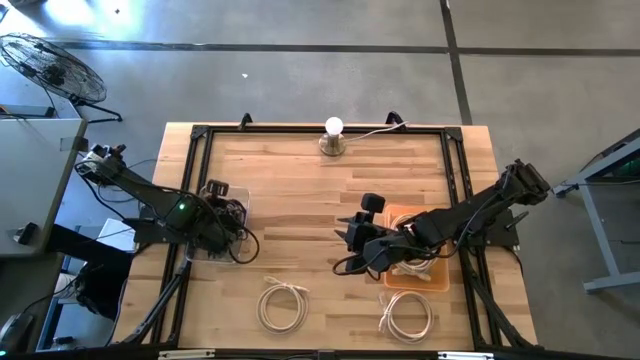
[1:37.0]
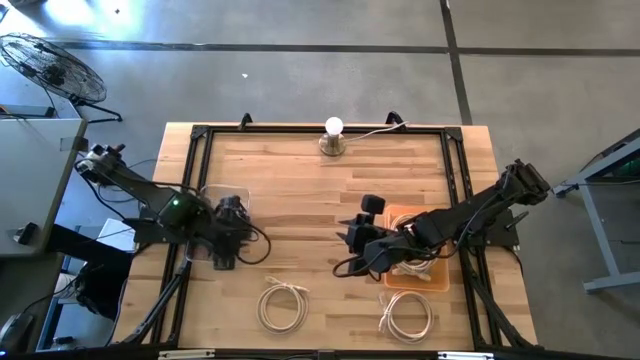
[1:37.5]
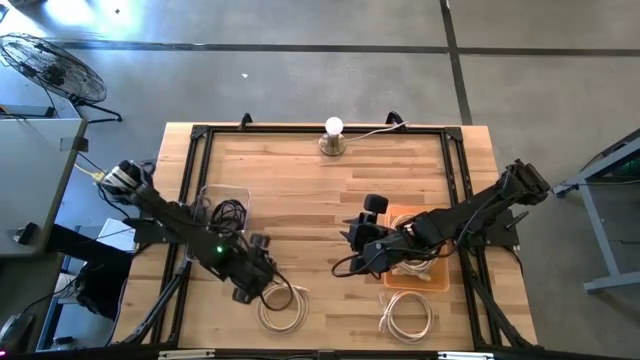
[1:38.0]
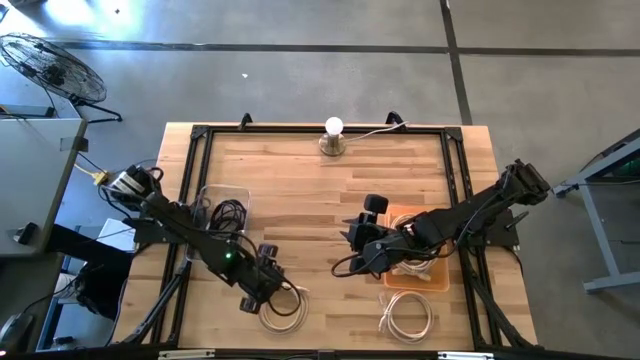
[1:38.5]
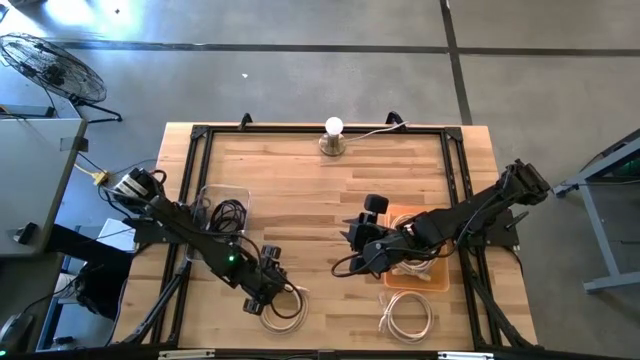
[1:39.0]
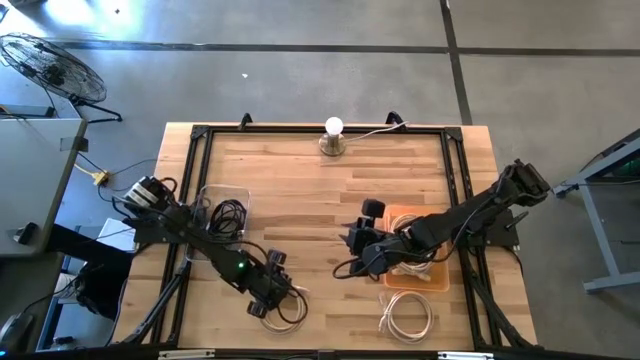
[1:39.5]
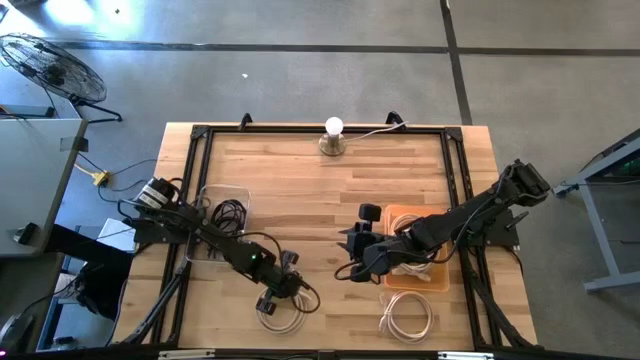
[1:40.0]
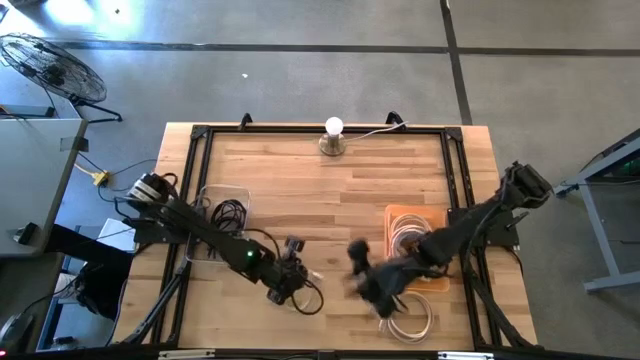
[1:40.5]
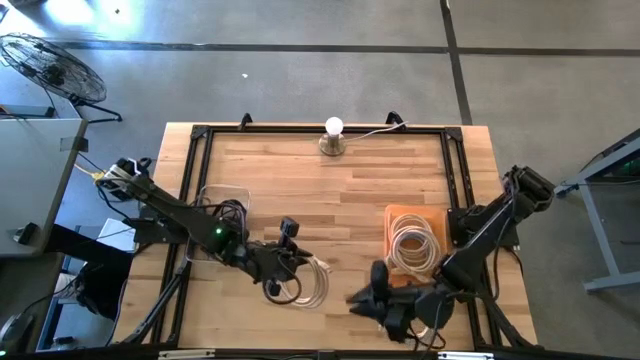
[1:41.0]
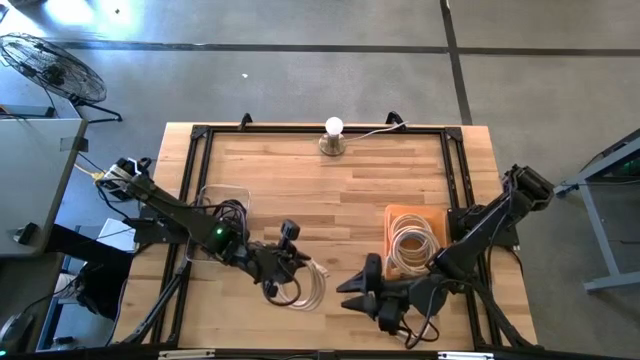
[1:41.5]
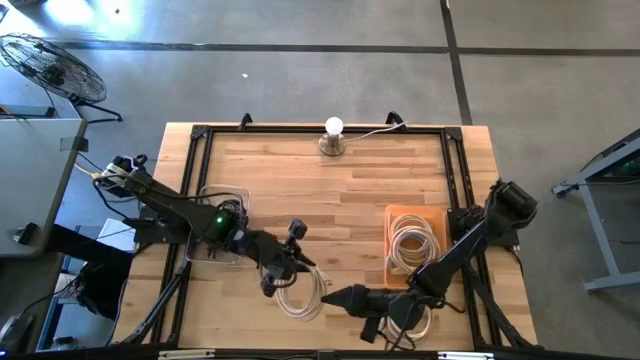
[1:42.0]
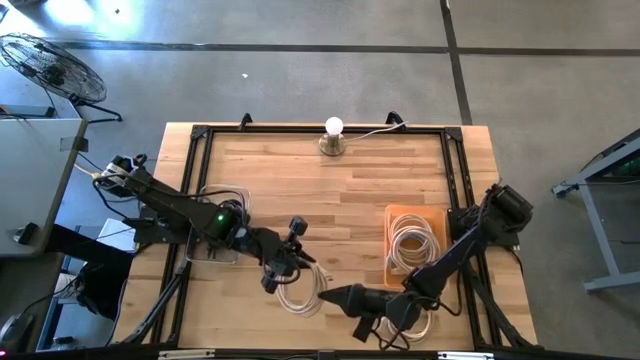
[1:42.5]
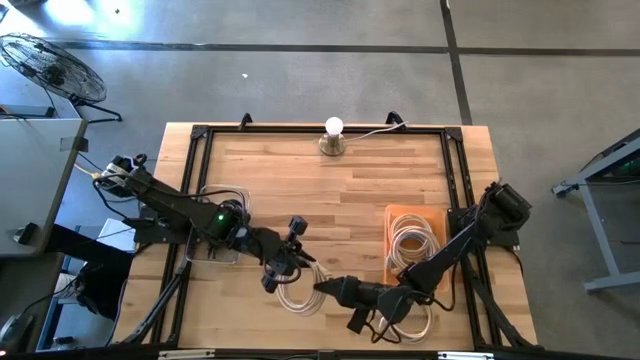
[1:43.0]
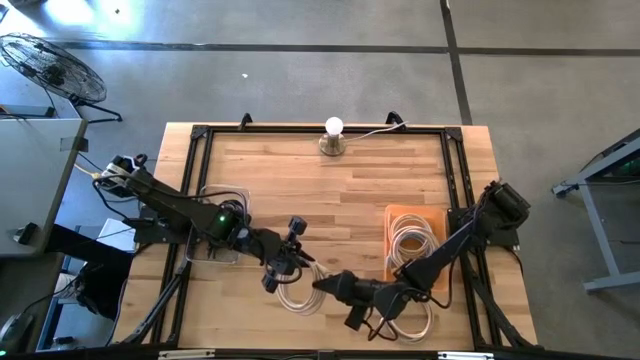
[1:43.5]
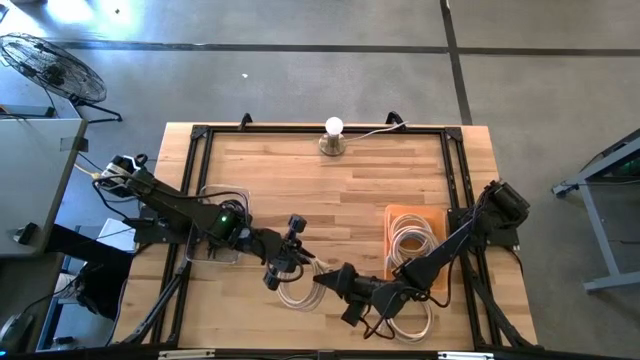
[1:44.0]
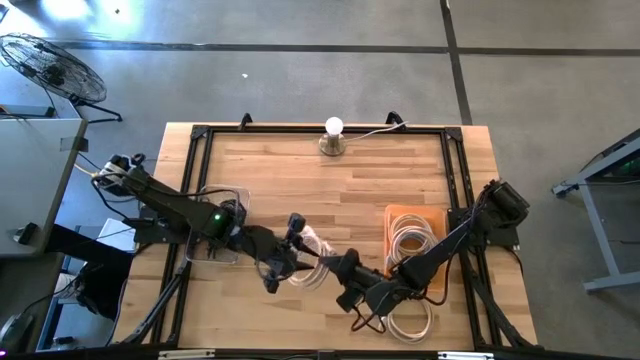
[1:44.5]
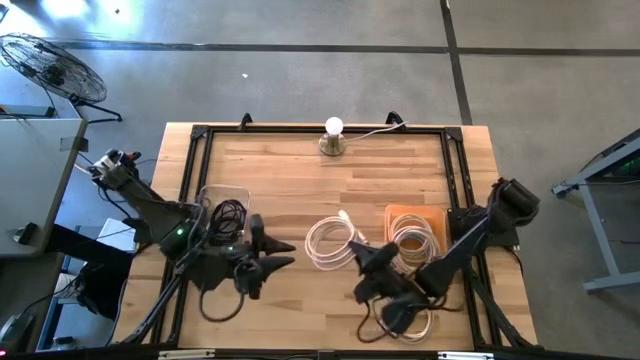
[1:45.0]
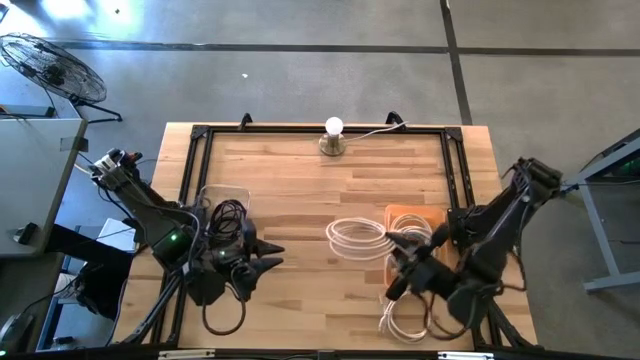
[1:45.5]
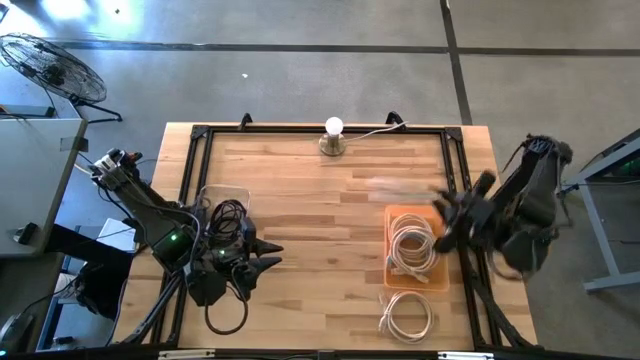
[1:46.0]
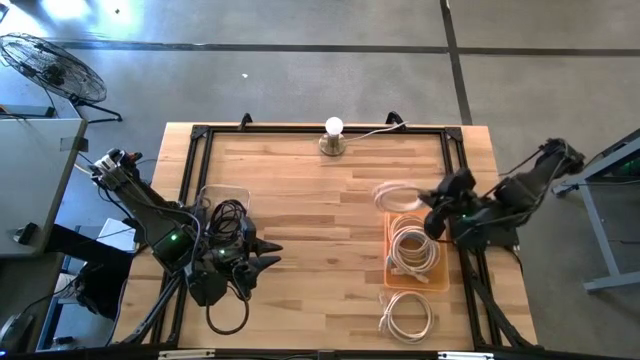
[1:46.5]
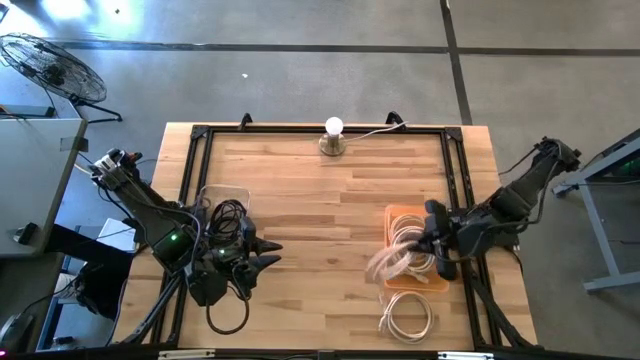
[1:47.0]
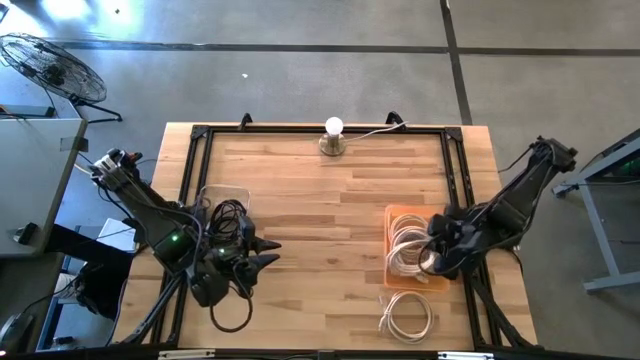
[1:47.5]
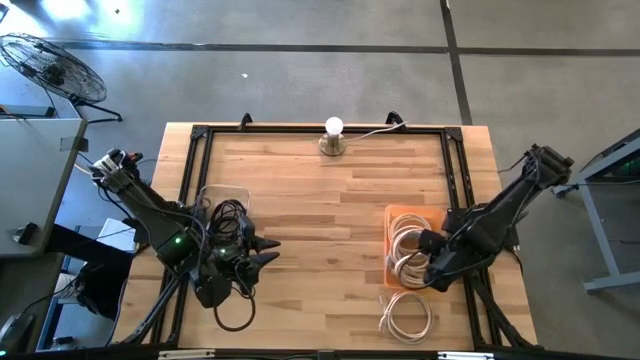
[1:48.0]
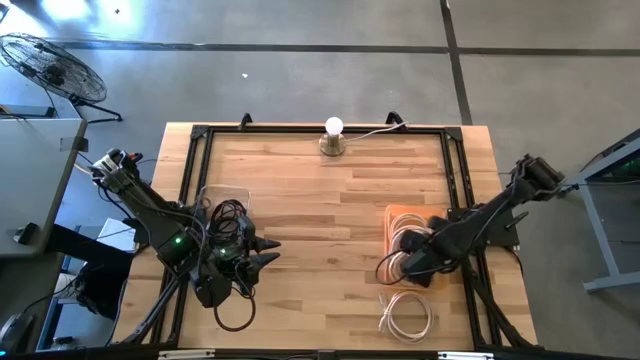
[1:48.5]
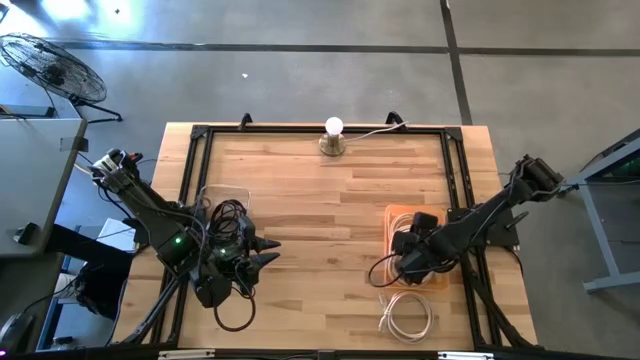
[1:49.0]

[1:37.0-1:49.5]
Task: Pick & Place USB Port
Put the brown HDMI cable into the orange bin

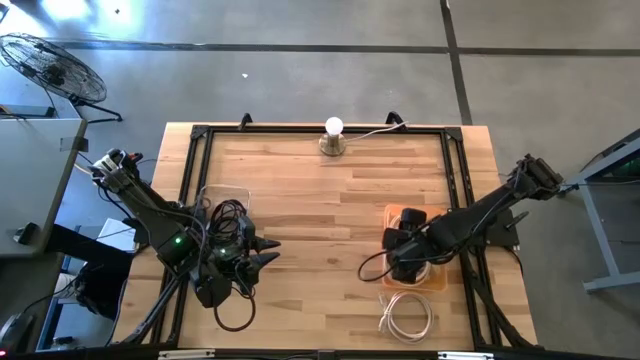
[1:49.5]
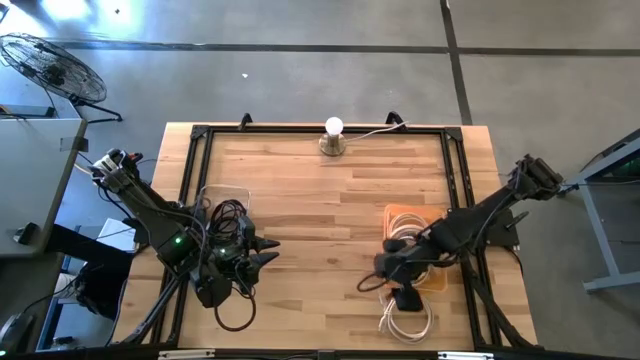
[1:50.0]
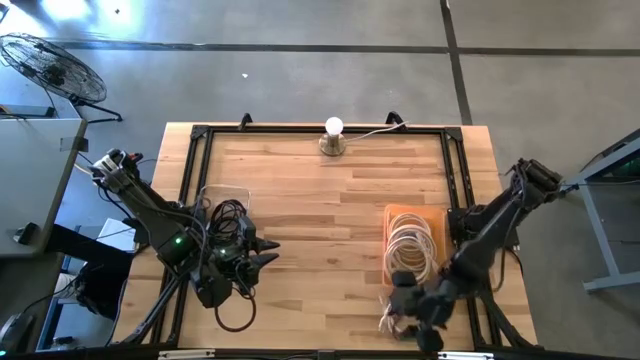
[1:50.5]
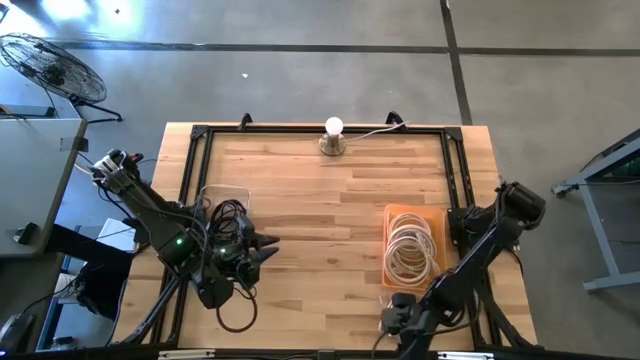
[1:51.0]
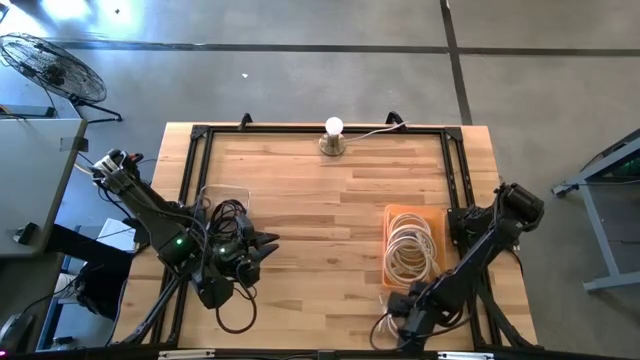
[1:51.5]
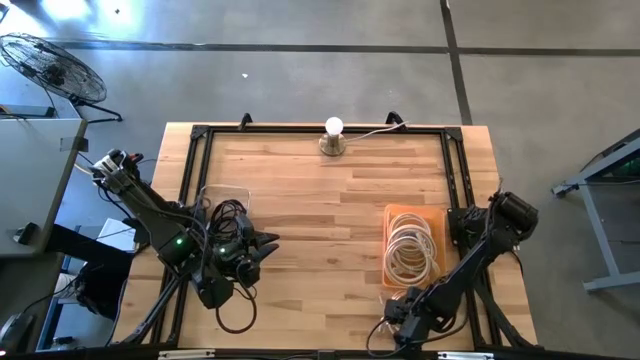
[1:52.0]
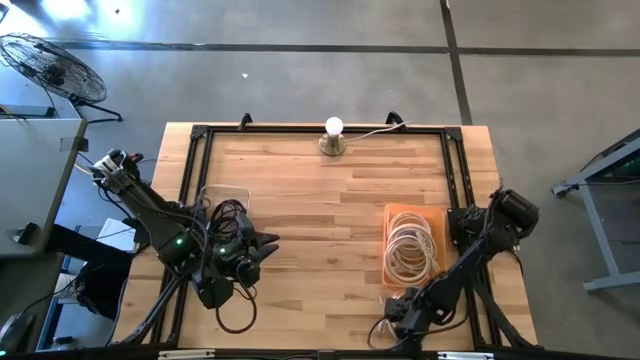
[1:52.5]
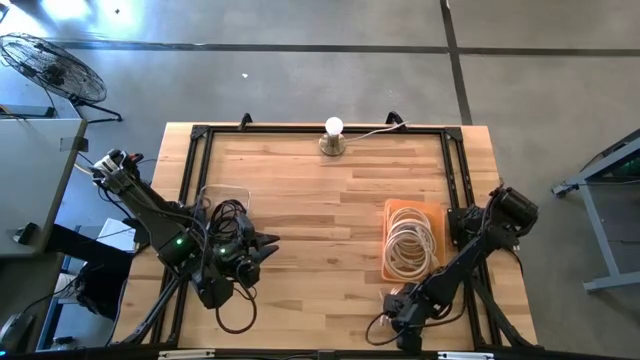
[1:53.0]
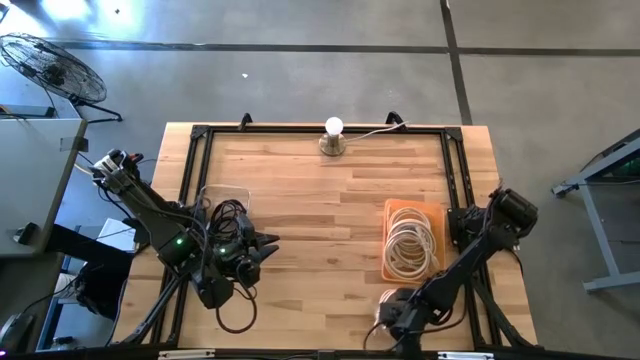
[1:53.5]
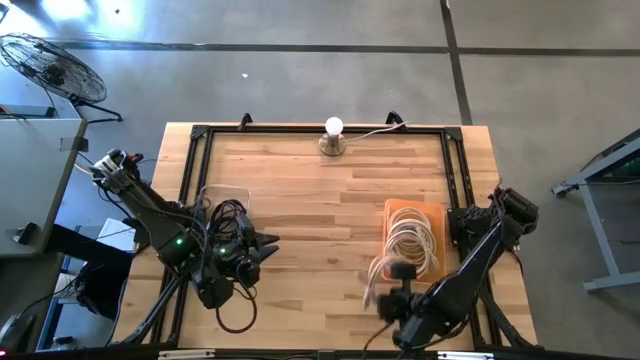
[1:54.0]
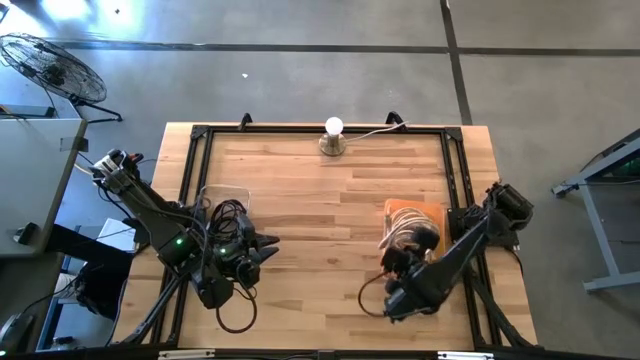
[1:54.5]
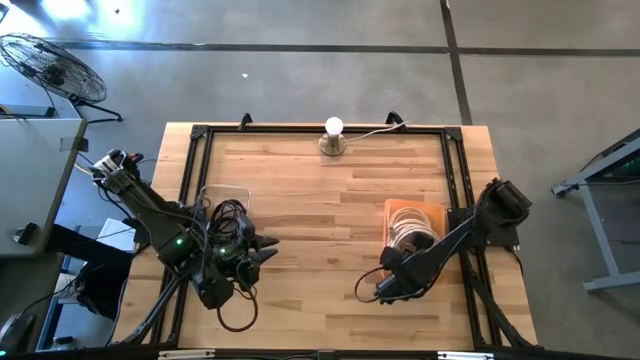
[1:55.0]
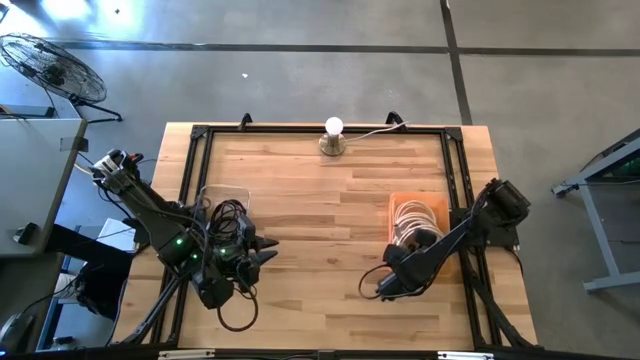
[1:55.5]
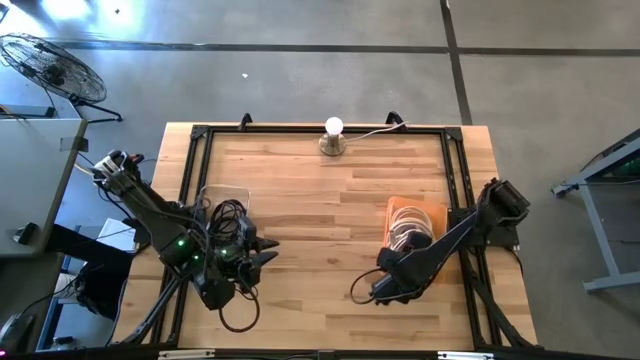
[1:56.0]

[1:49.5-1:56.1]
Put the brown HDMI cable into the orange bin

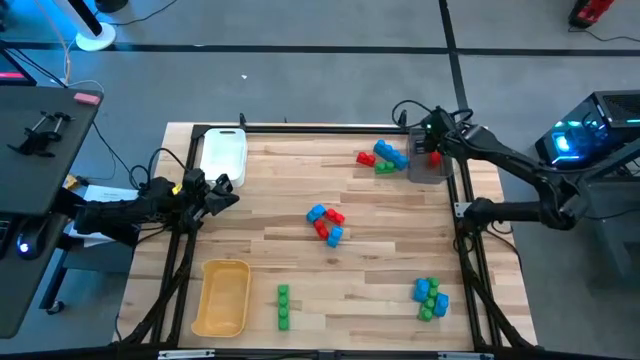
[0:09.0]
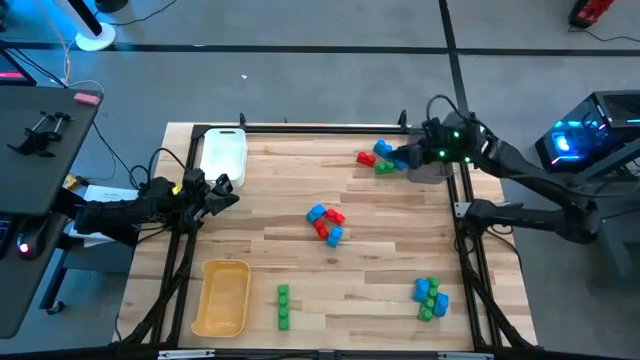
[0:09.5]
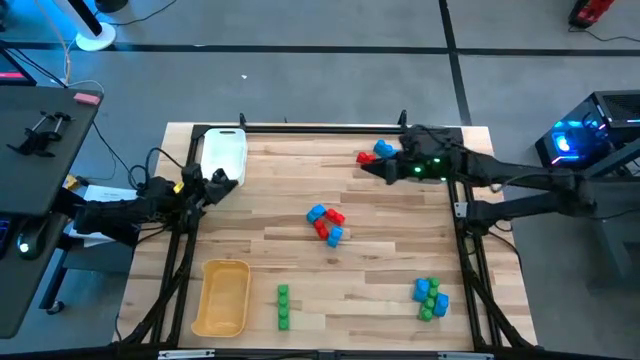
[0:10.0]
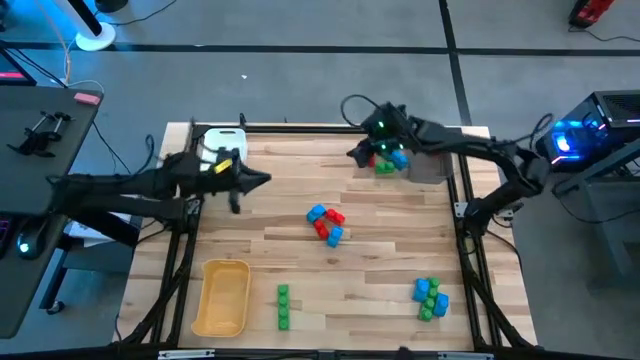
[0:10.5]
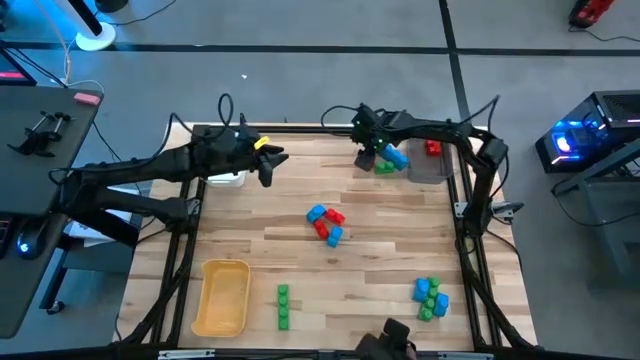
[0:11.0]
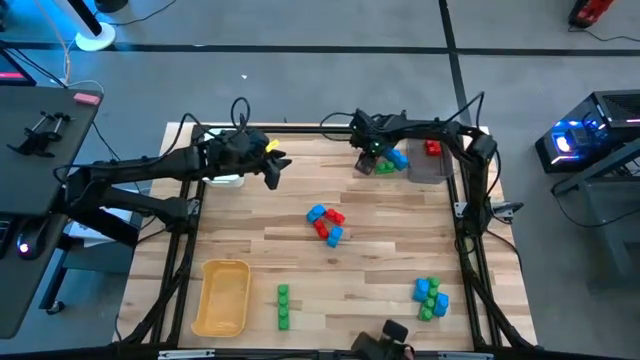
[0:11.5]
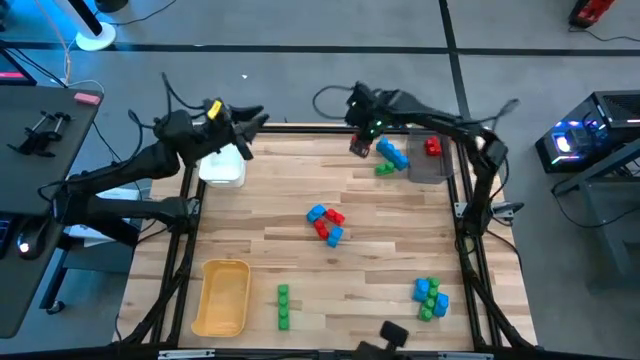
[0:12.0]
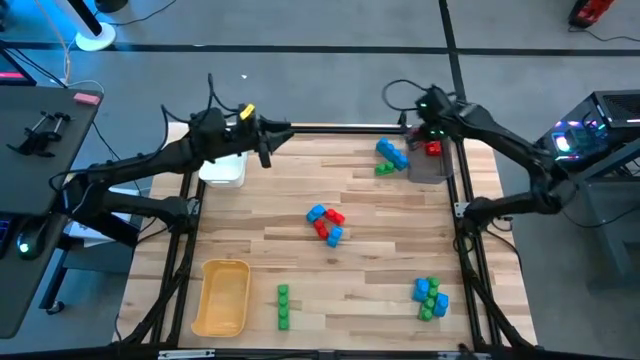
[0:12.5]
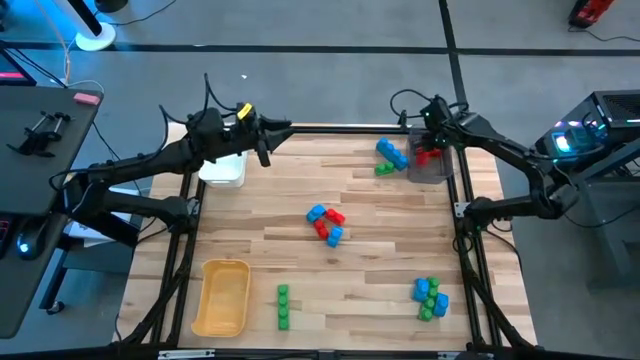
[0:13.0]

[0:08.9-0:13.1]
Task: Sort blocks
Put the red game piece into the black bin
